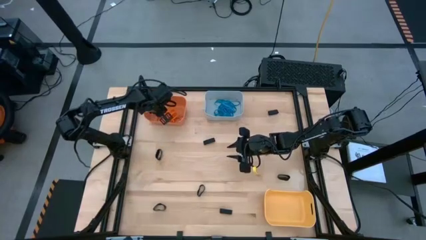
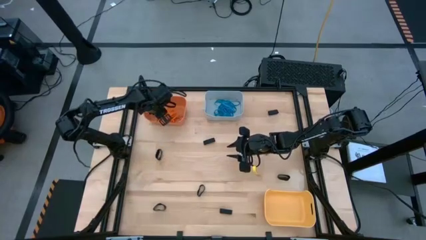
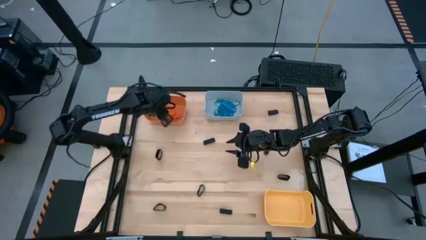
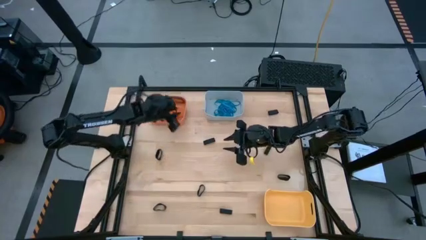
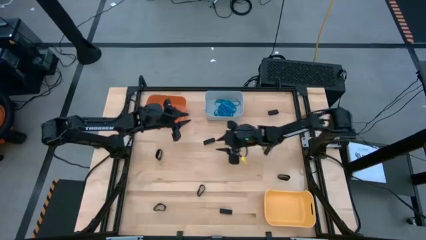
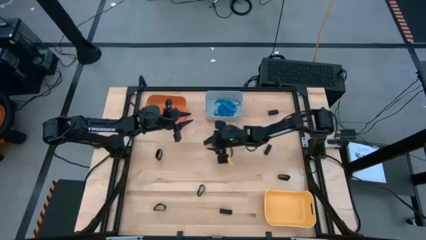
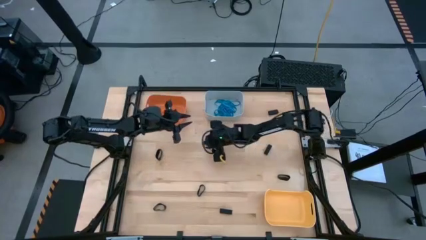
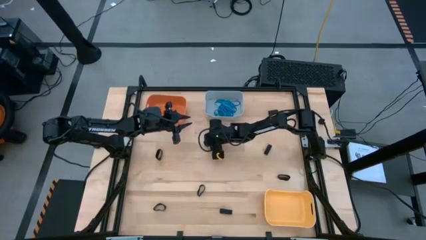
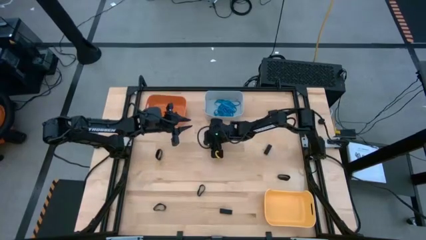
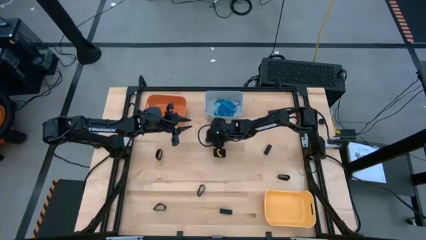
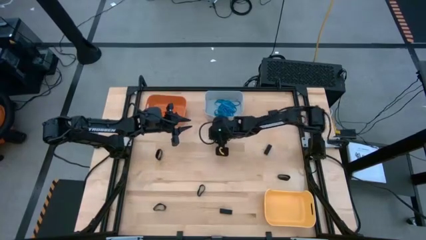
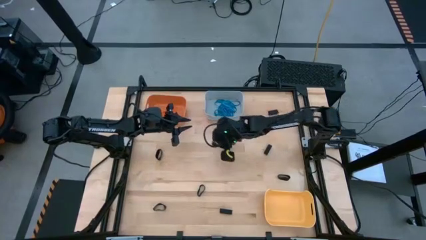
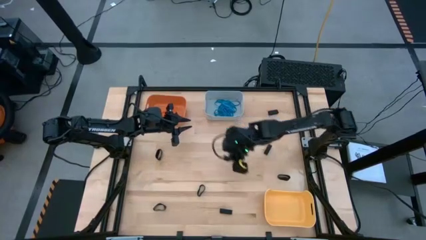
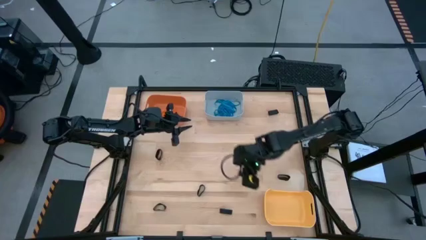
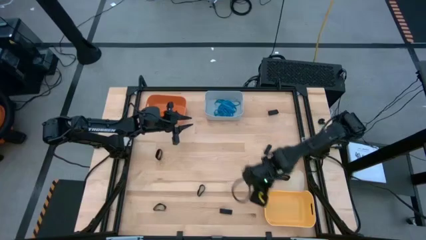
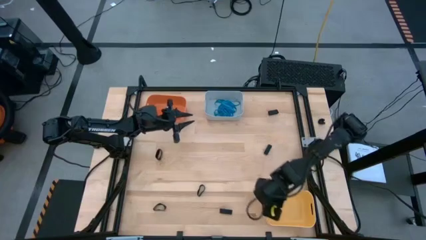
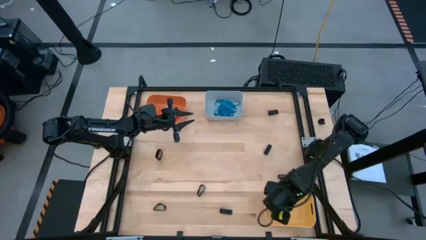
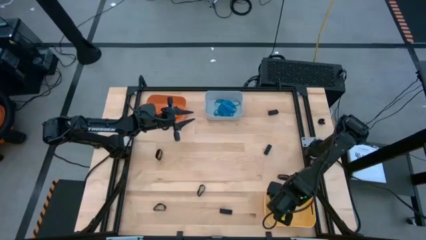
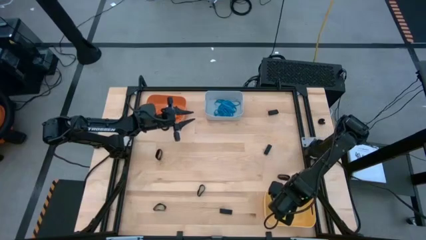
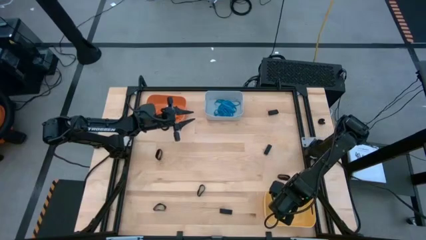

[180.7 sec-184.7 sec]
Task: Sort rubber bands into baskets
Put the black rubberband into the yellow bin

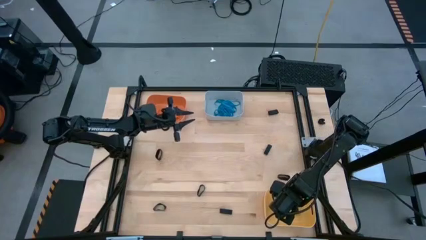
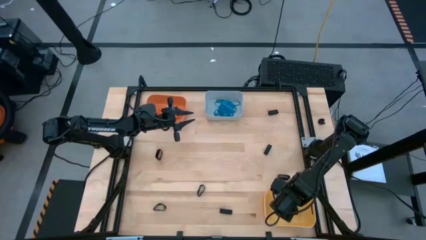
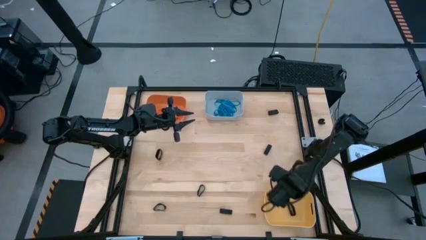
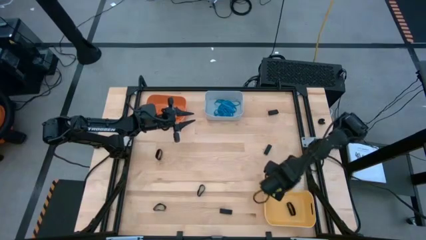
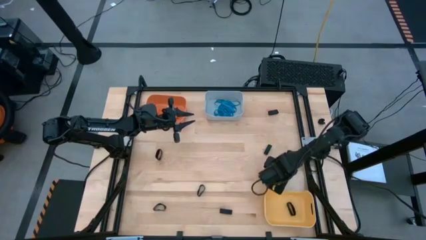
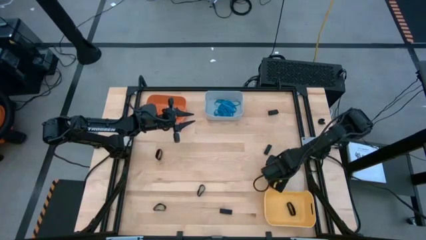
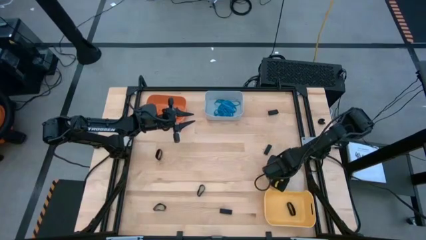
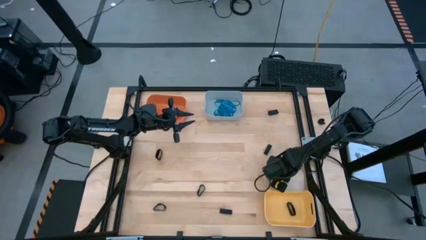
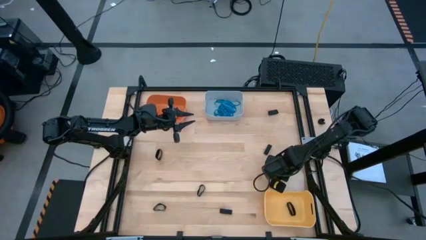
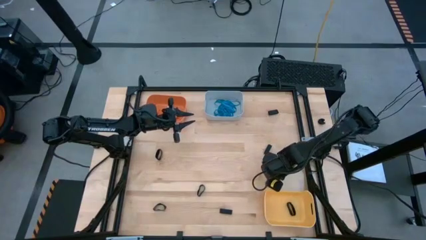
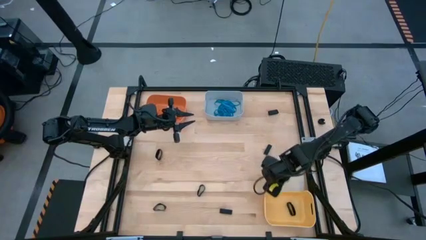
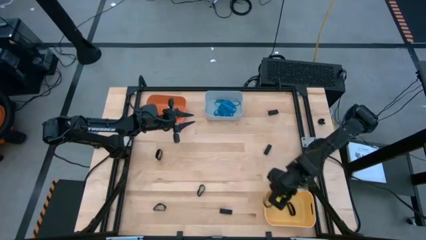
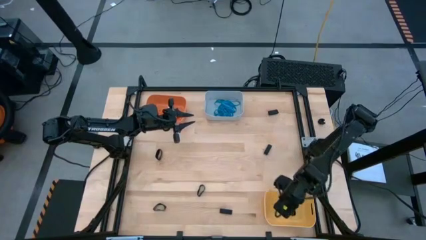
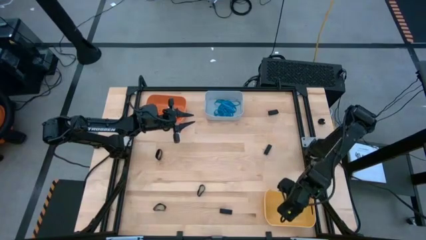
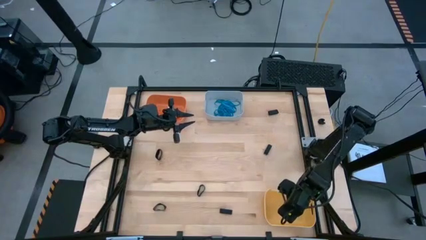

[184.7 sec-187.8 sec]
Put the black rubberband into the yellow bin

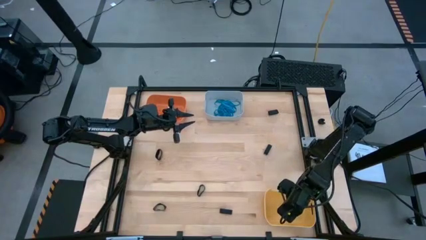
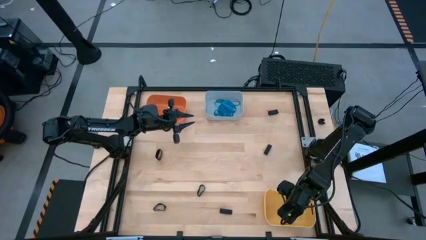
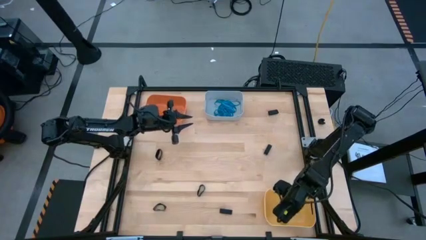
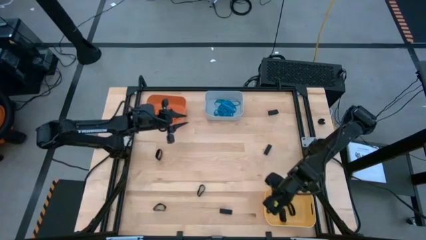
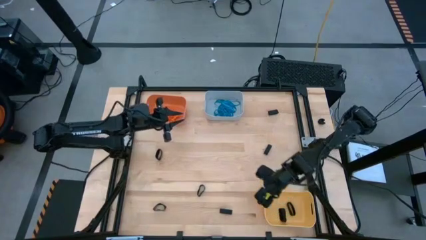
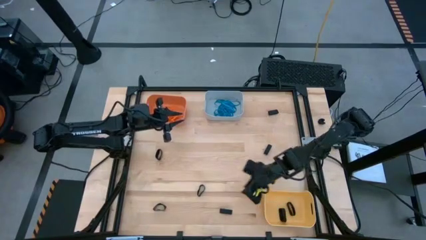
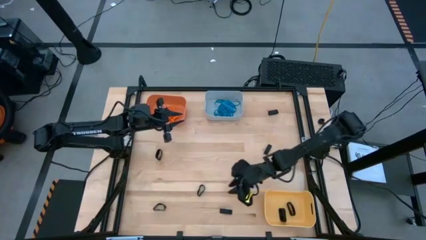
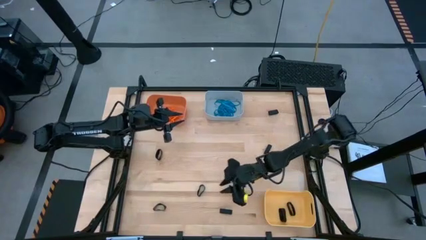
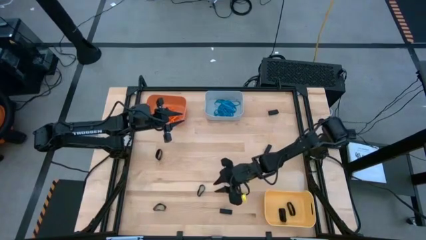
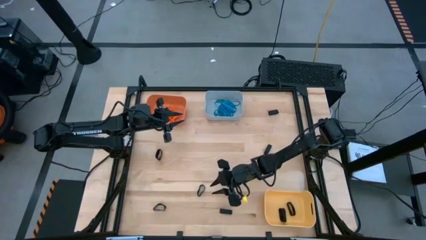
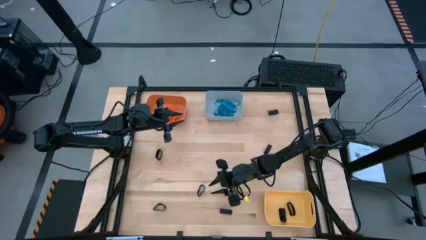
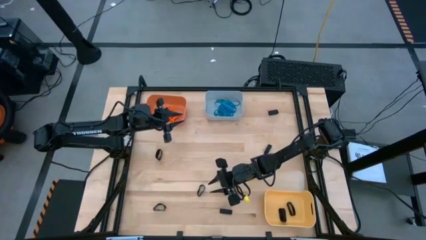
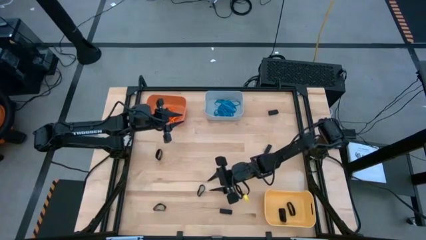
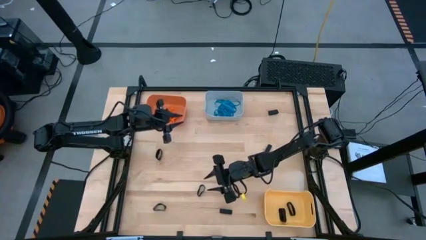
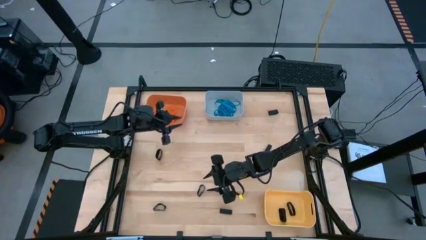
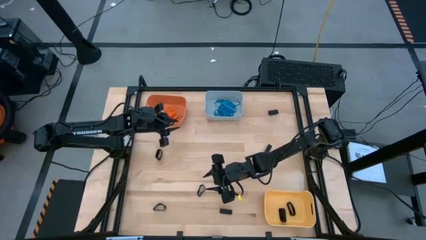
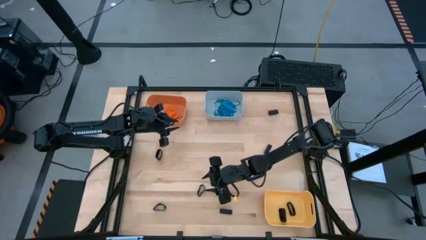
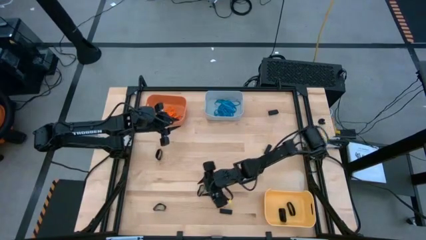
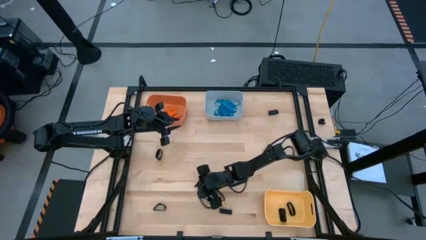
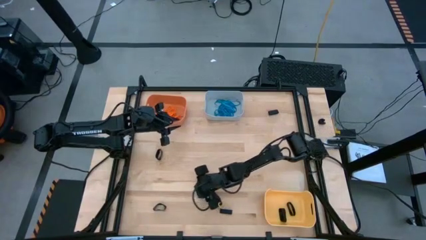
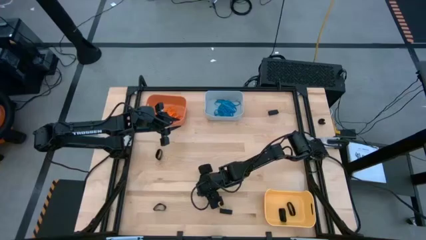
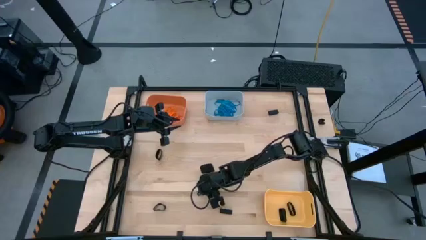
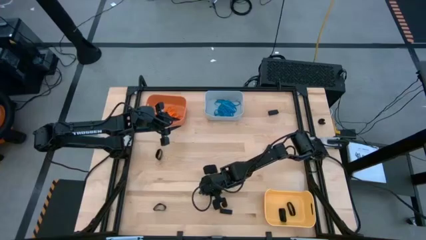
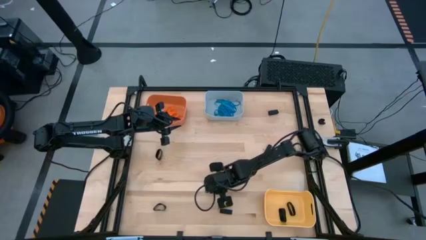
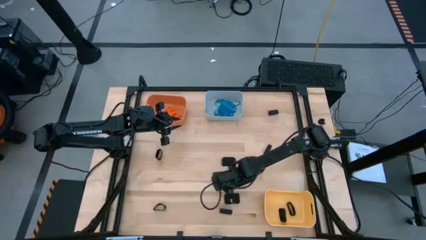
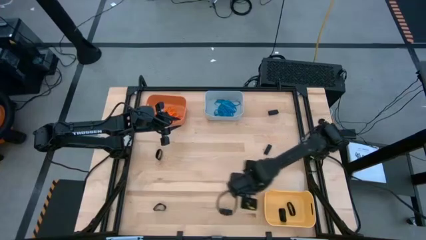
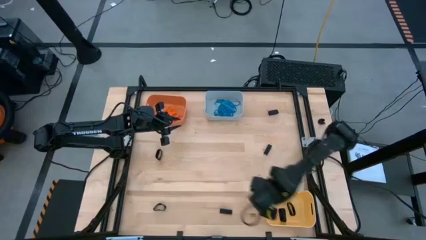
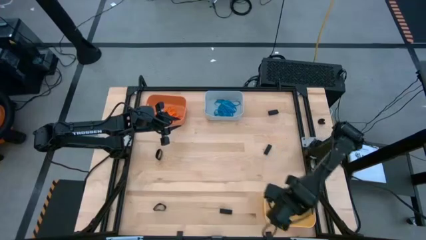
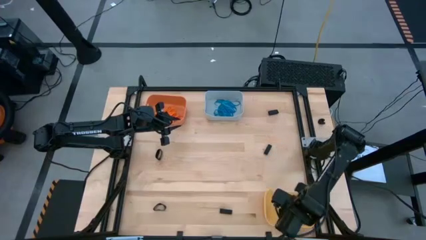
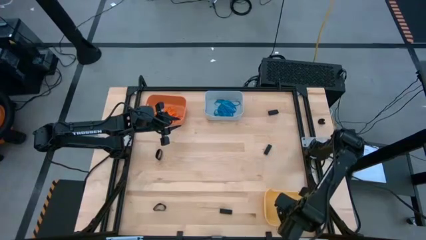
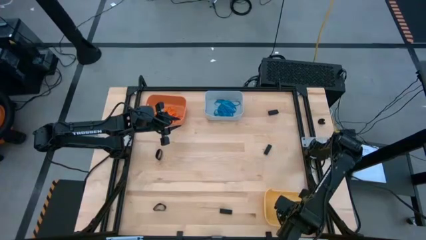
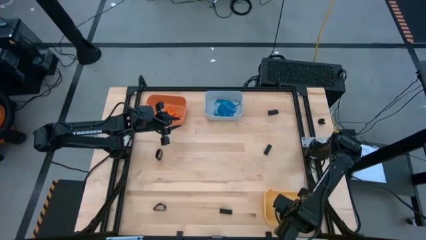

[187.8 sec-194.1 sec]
Put the black rubberband into the yellow bin

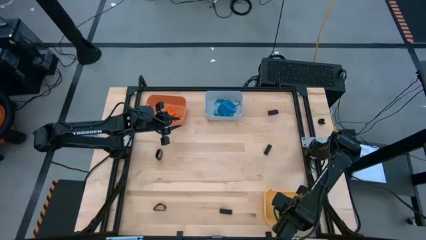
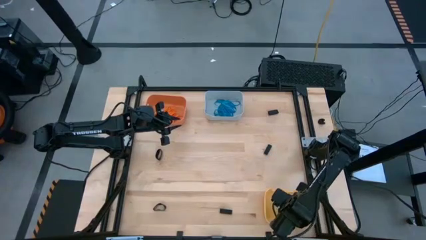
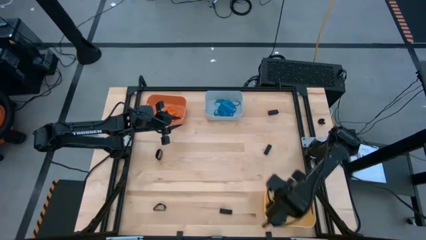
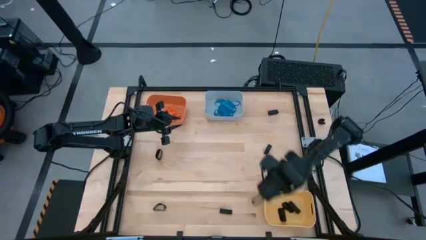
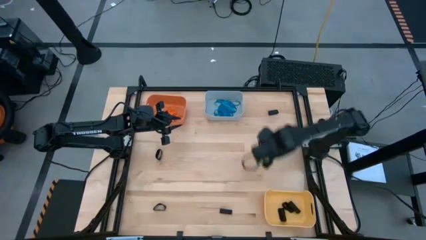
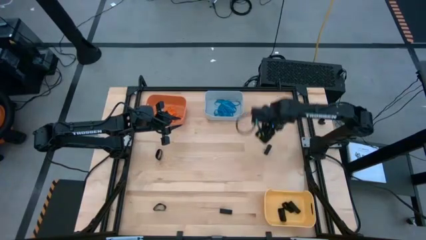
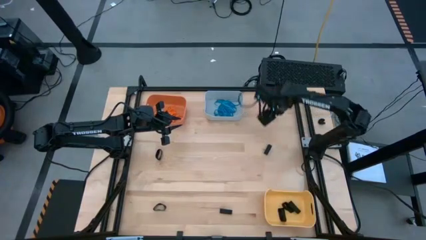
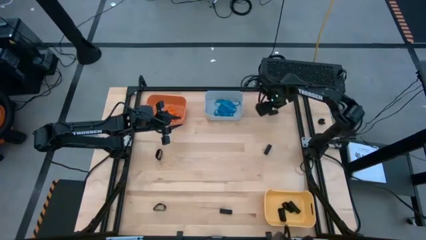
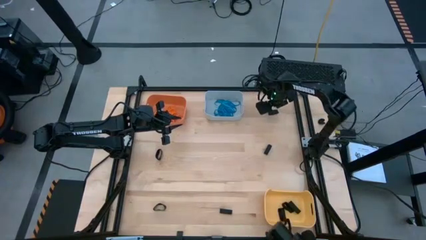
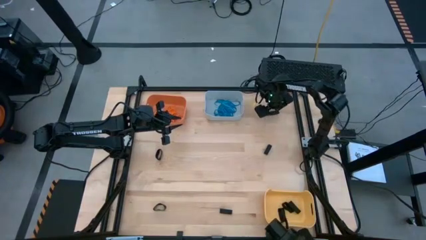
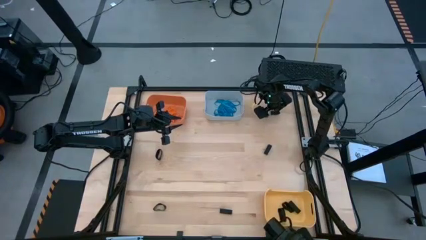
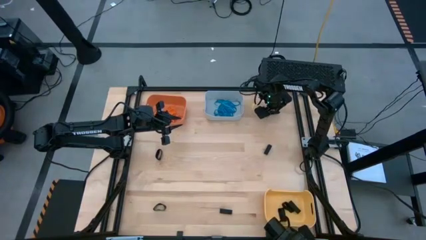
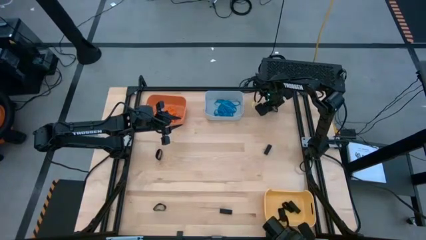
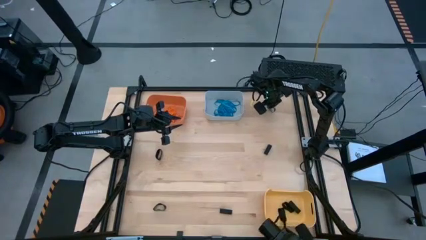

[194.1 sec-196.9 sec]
Put the black rubberband into the yellow bin
